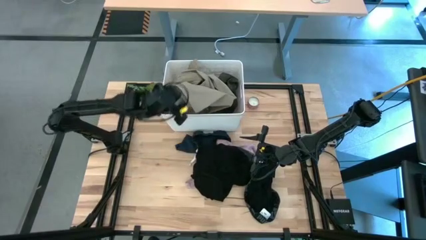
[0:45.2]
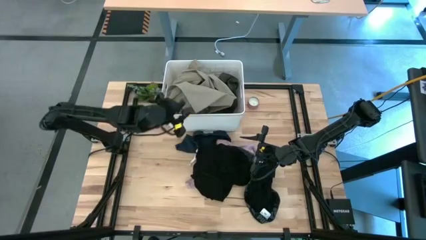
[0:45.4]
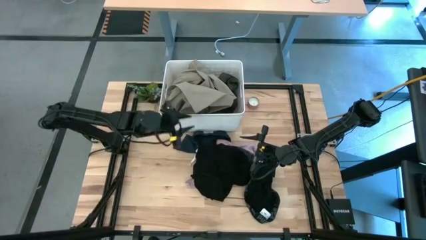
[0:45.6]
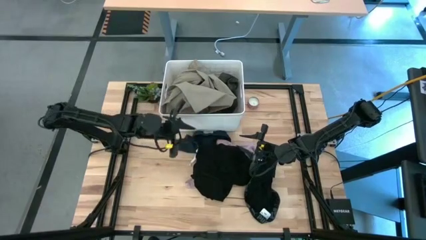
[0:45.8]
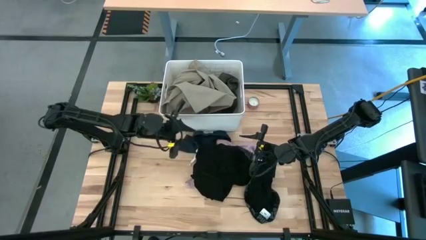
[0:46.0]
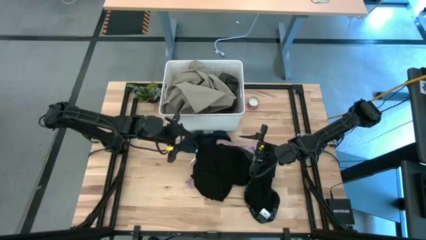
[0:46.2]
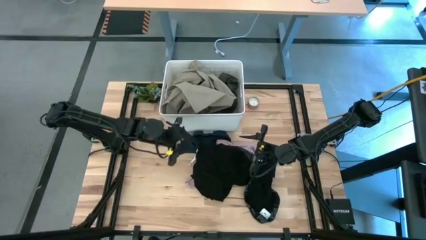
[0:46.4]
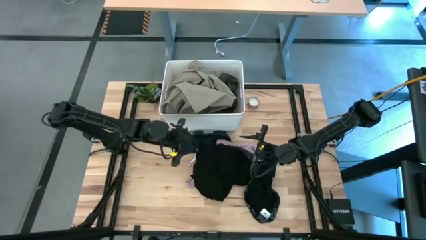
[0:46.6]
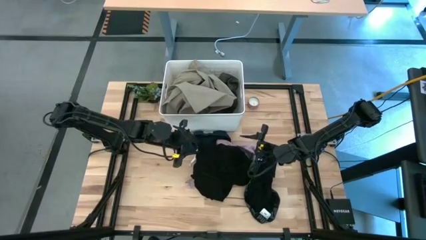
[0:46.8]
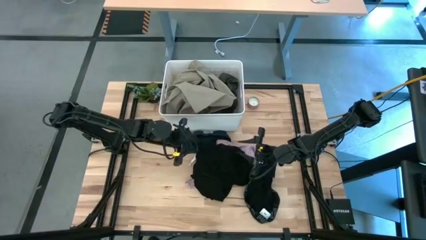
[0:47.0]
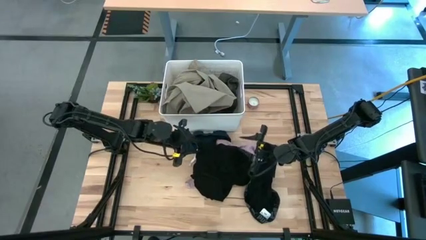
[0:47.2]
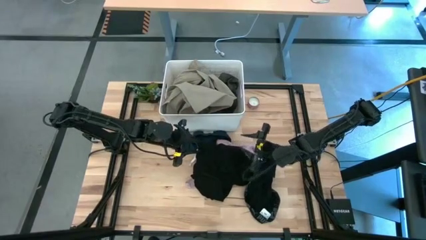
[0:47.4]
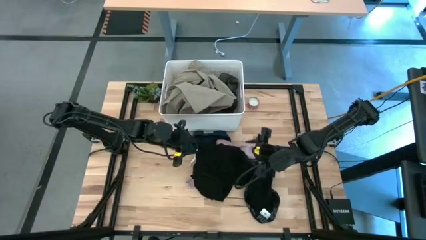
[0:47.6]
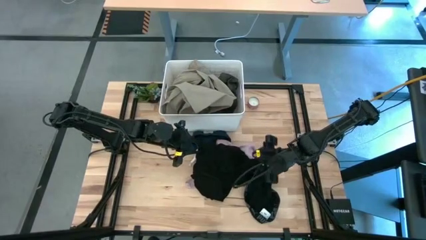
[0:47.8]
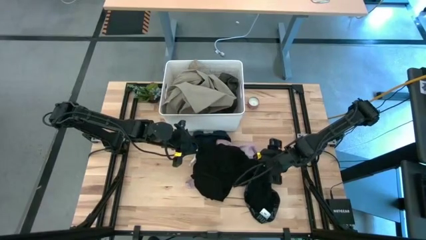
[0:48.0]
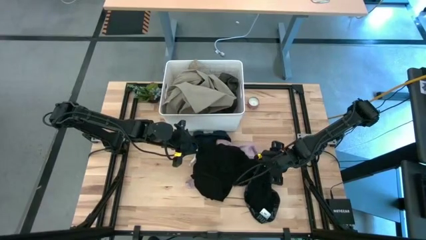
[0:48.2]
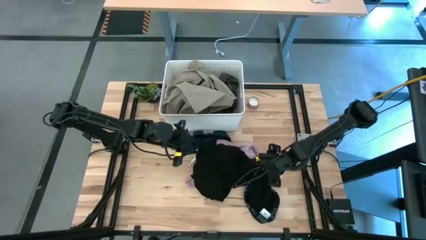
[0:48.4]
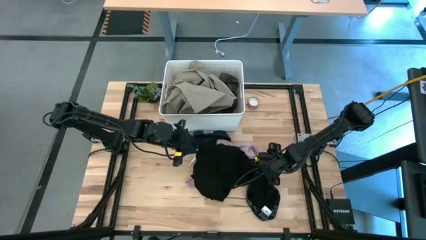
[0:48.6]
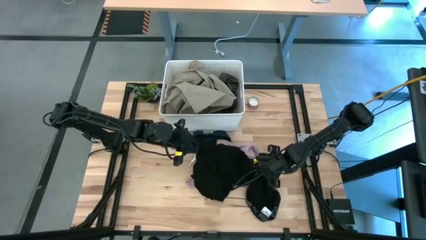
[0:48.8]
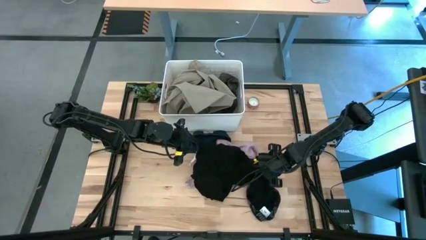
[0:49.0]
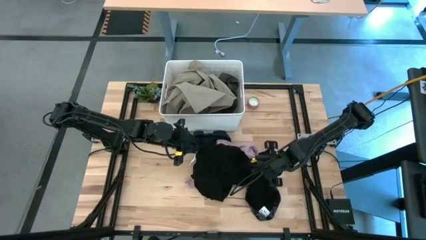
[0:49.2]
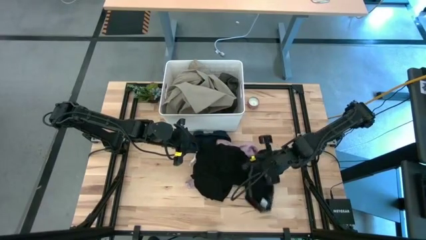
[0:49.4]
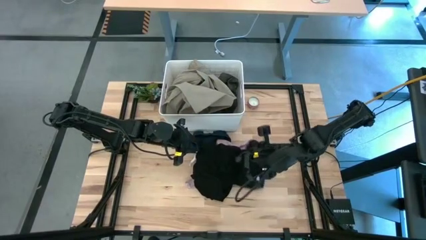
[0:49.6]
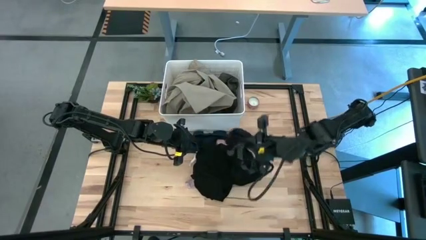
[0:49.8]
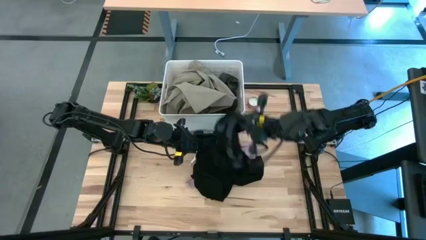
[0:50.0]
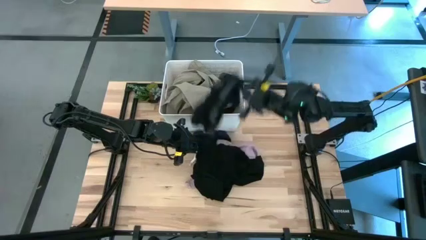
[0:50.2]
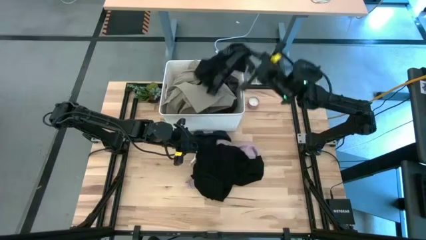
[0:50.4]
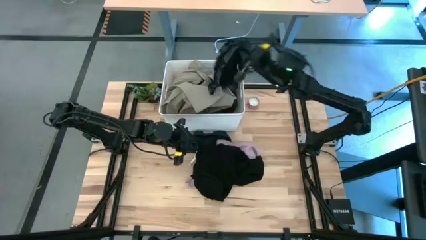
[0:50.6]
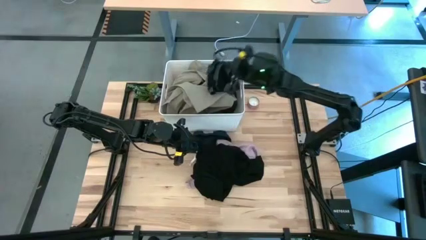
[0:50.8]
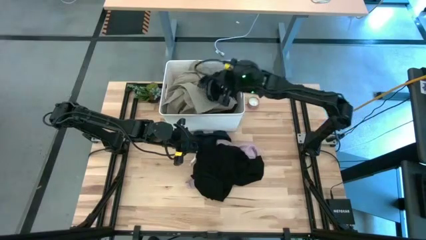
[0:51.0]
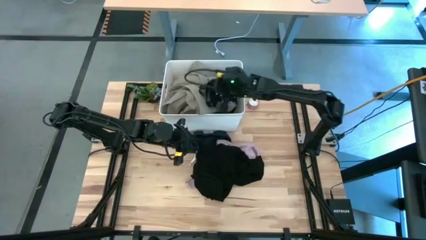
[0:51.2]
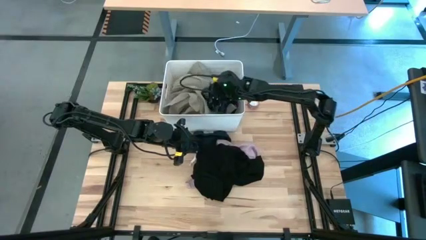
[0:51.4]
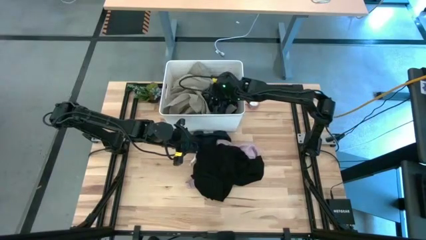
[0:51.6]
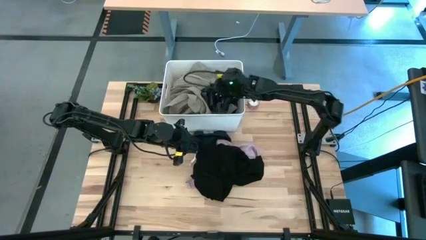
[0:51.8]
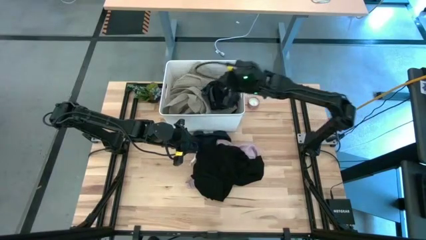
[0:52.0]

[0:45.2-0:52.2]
Task: Sort clothes
Put the black underwear into the white bin

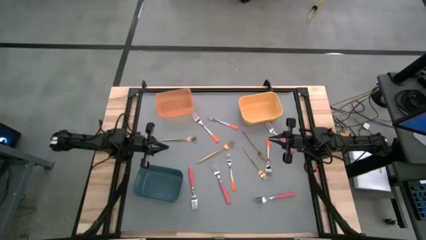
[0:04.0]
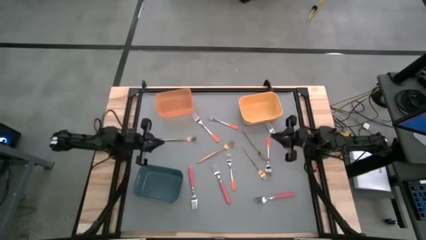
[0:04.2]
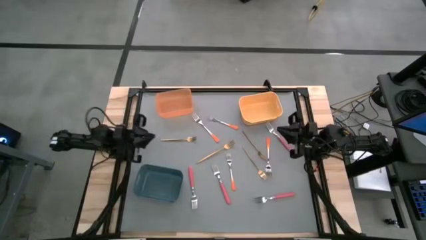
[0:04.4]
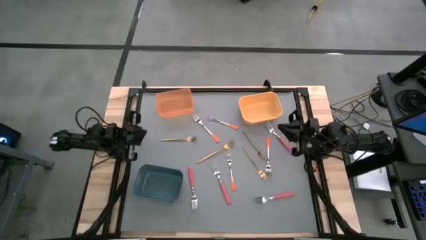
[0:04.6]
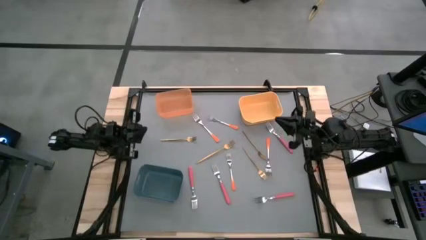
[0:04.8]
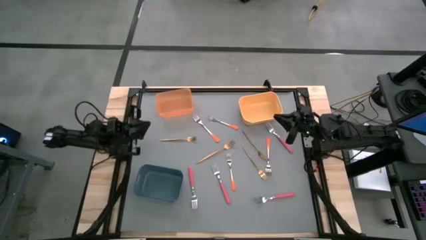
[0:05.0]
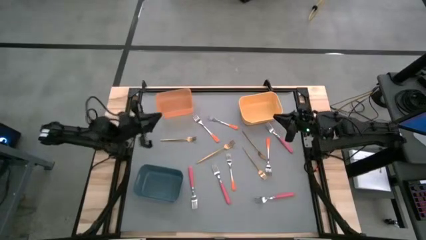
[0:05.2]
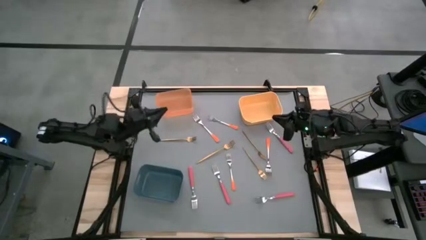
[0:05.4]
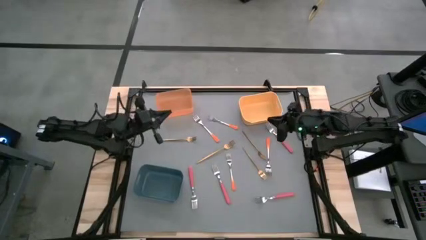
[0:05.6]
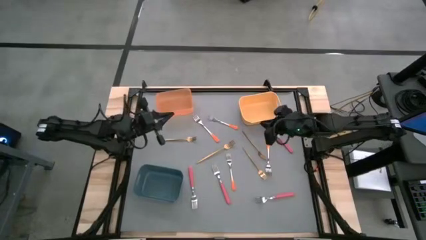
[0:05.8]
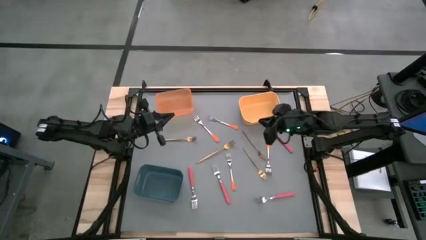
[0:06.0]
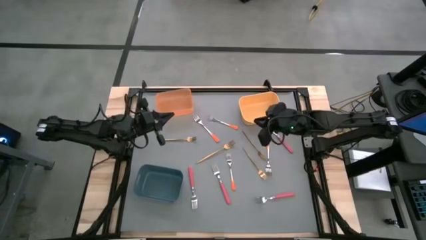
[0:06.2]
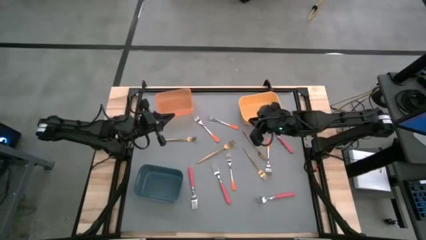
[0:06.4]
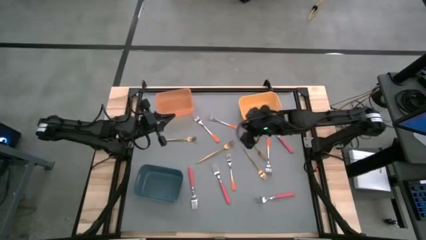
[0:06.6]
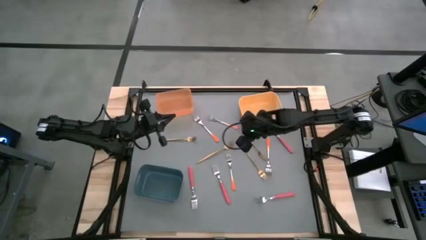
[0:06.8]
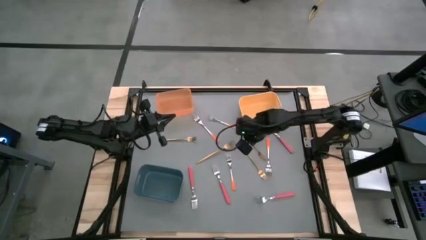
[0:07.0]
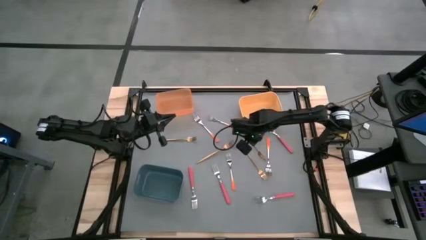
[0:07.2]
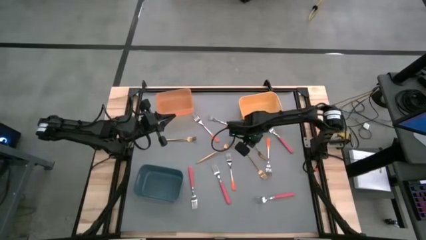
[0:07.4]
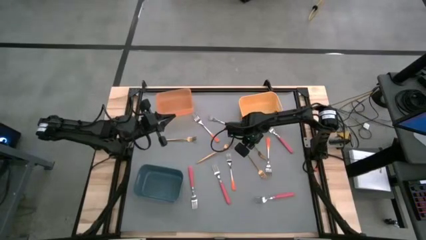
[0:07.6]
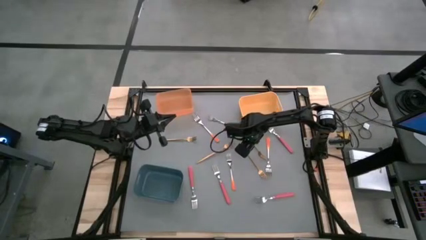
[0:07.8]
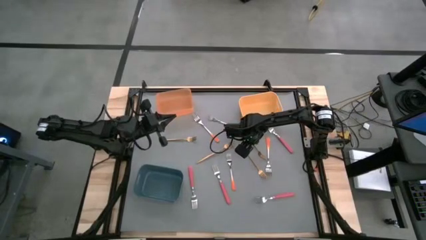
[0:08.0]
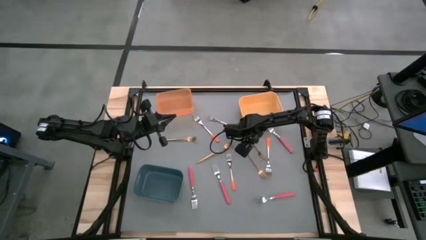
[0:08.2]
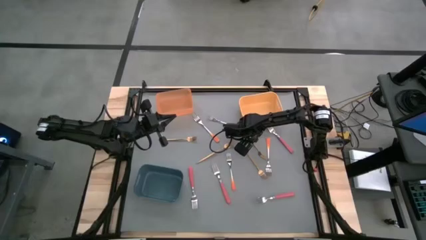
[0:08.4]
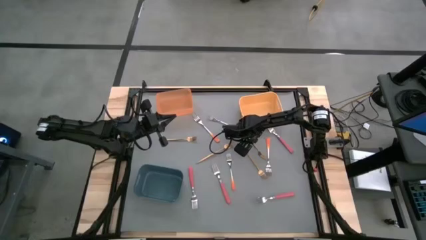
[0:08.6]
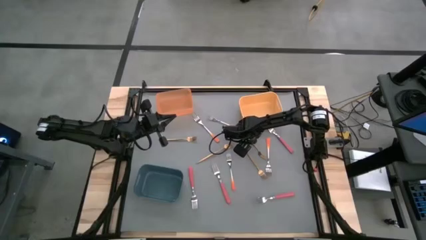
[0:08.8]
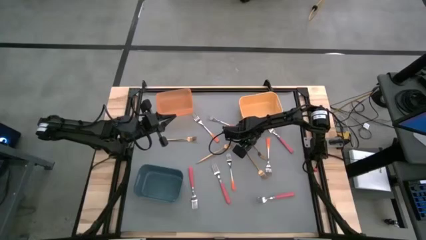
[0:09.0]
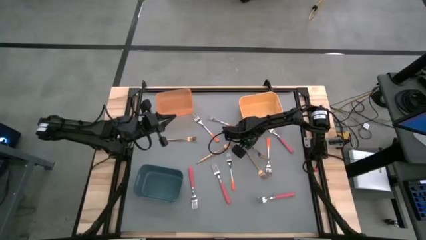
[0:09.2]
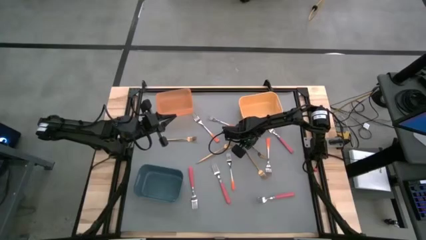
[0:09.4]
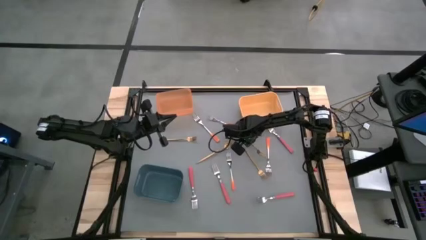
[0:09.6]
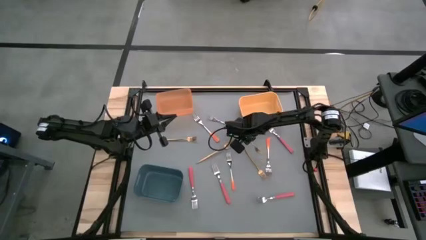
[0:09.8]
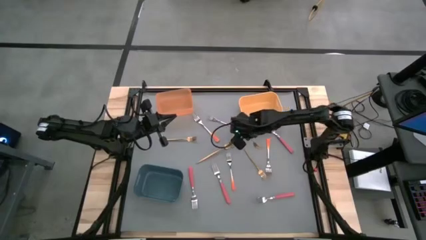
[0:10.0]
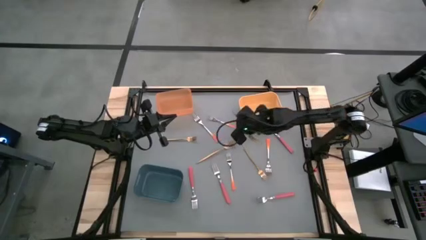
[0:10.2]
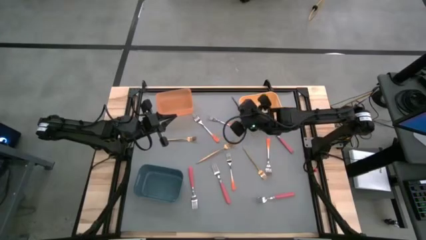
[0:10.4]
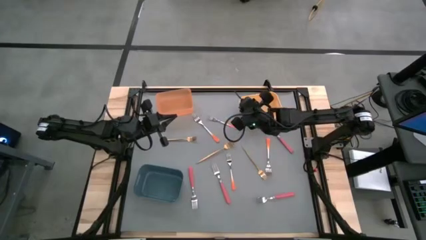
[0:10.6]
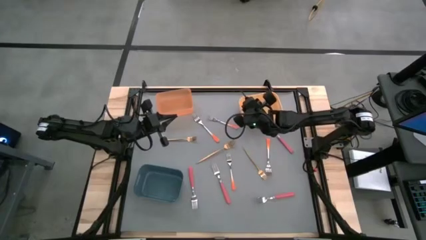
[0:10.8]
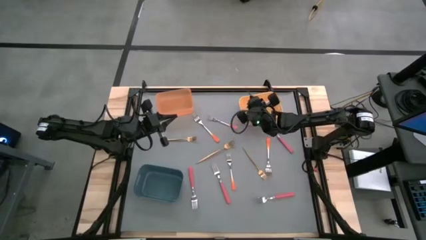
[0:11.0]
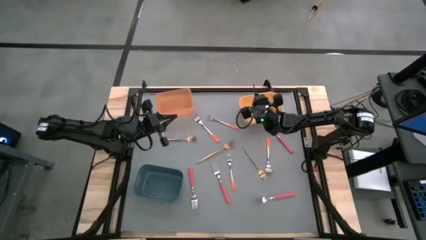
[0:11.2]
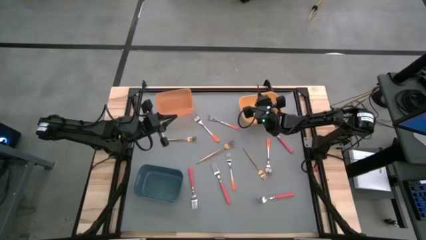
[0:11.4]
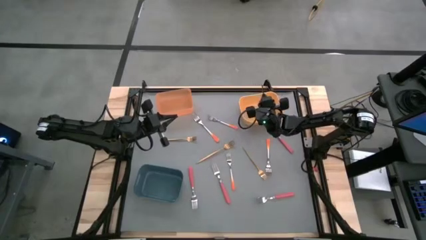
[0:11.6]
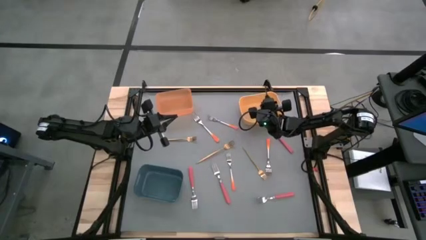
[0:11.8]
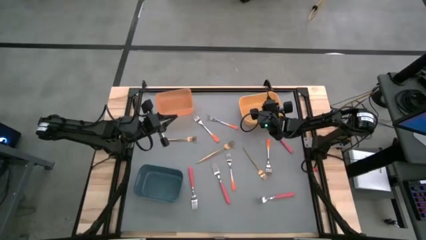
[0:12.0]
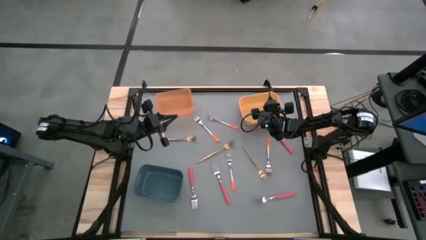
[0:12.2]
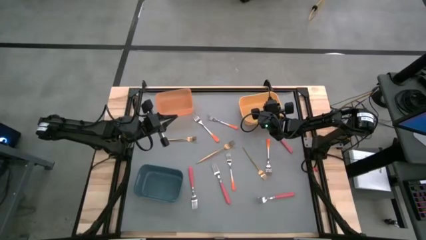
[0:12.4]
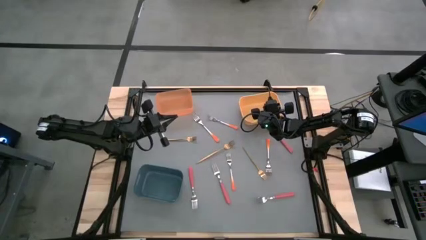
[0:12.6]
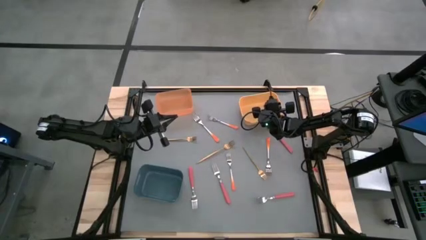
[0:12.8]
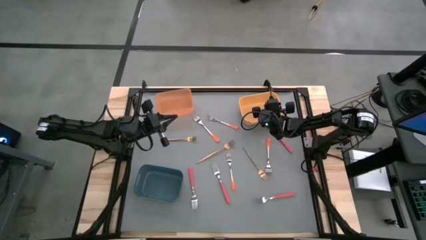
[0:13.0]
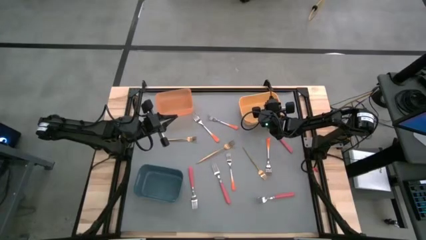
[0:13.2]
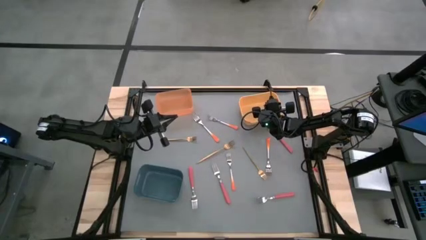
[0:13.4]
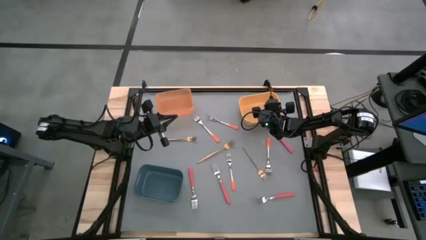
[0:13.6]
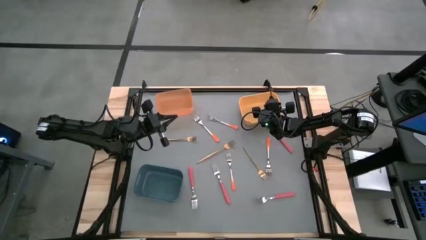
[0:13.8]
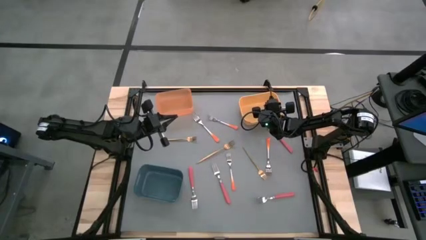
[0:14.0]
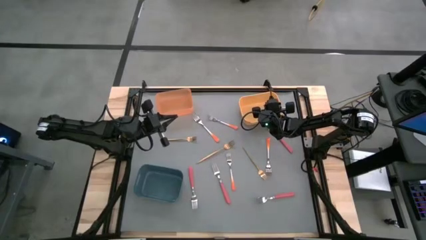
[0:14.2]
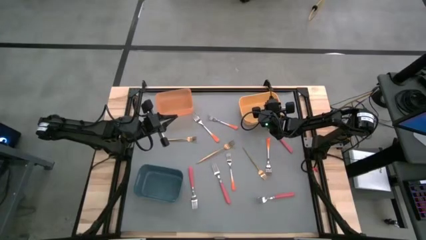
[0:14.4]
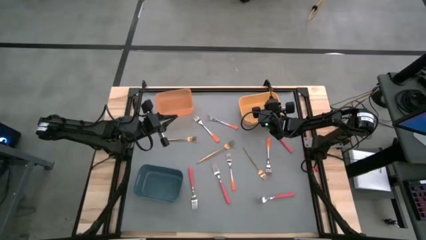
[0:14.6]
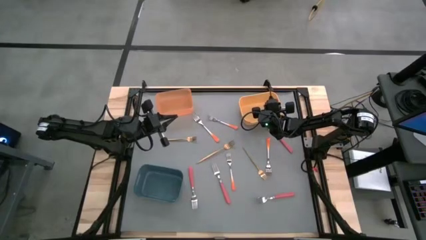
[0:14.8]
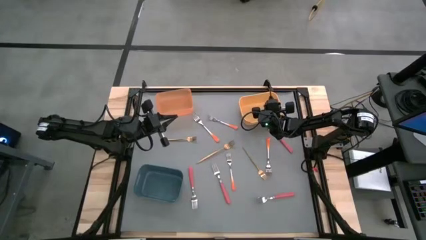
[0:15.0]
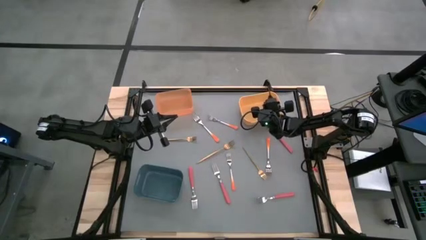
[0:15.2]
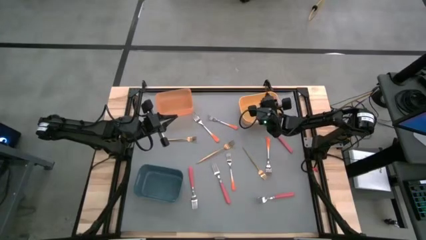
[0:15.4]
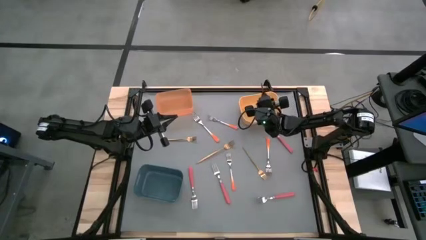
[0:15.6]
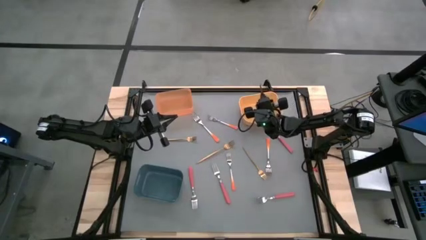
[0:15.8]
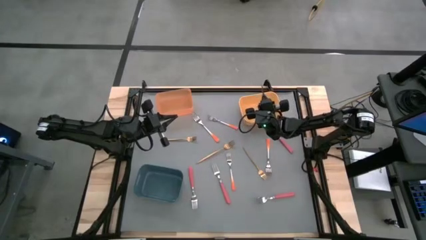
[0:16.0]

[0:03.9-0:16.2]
Task: Sort silverware by color (type)
Put the gold fork into the yellow bin
